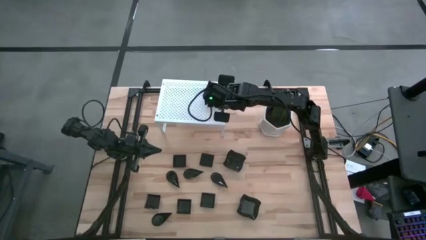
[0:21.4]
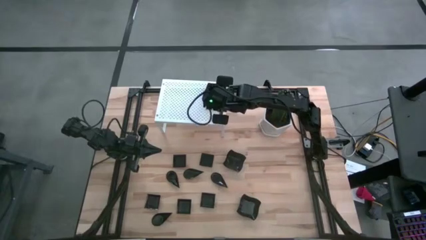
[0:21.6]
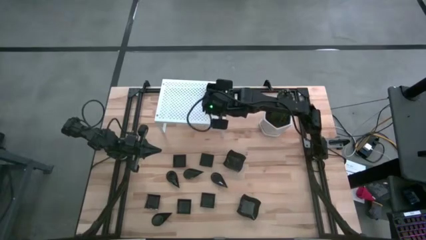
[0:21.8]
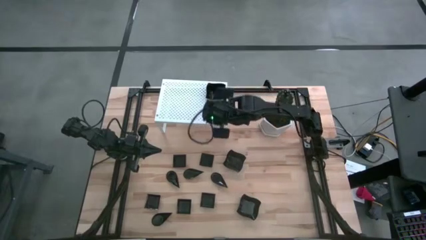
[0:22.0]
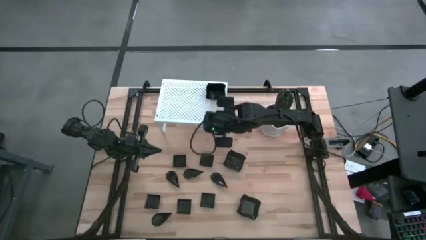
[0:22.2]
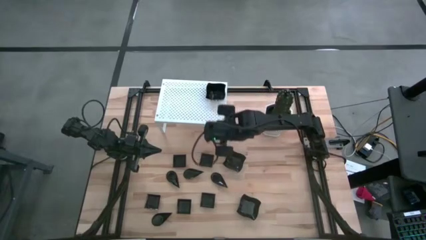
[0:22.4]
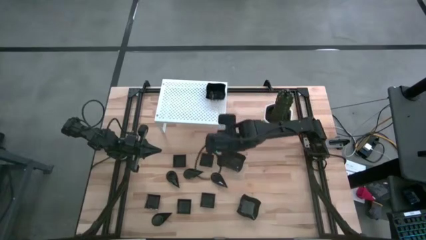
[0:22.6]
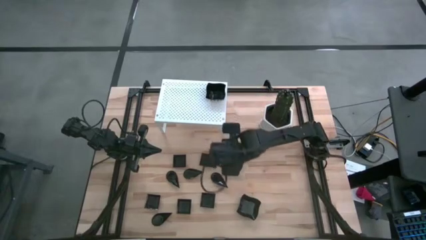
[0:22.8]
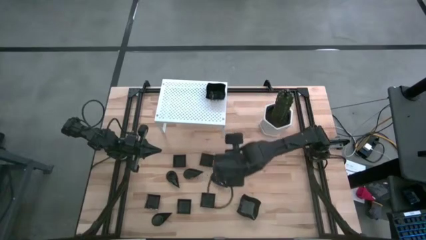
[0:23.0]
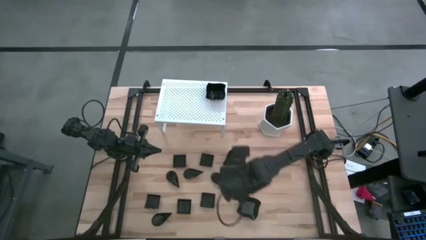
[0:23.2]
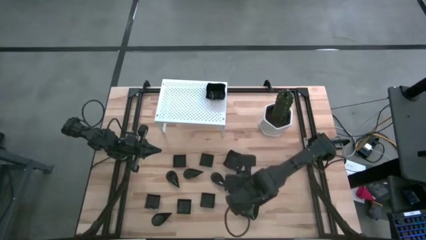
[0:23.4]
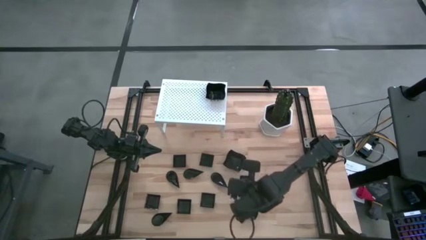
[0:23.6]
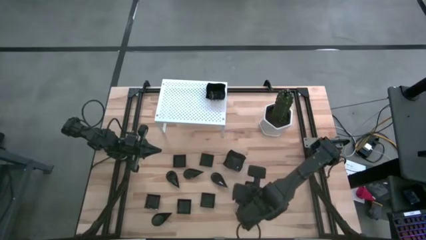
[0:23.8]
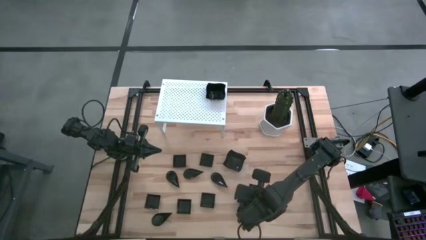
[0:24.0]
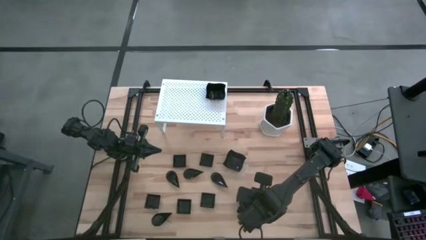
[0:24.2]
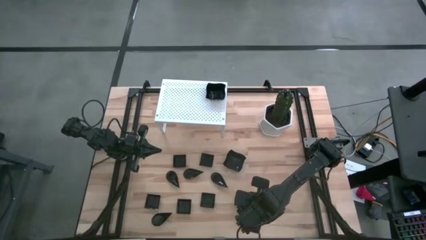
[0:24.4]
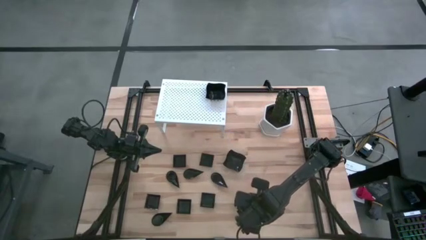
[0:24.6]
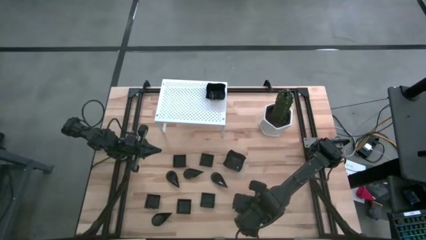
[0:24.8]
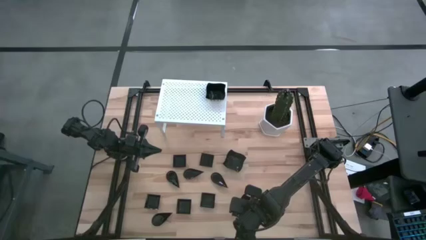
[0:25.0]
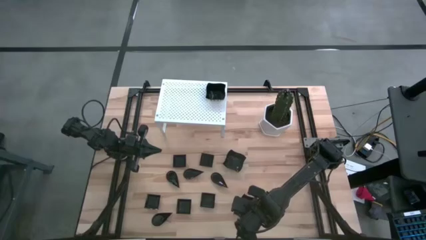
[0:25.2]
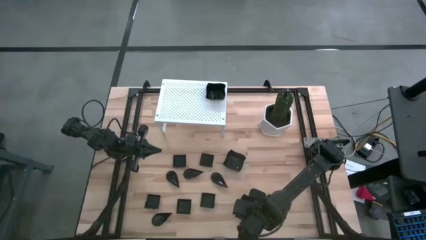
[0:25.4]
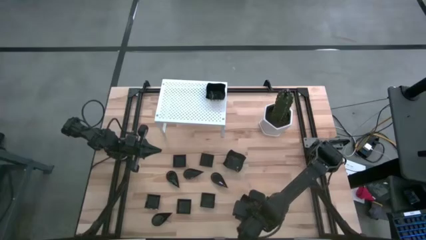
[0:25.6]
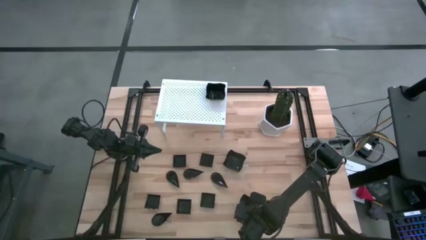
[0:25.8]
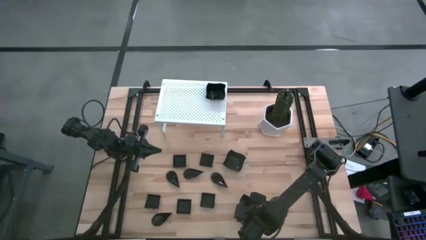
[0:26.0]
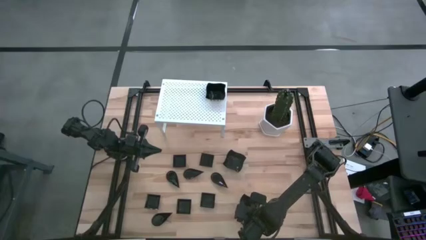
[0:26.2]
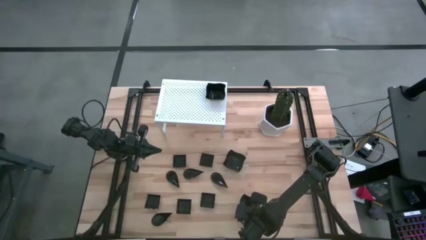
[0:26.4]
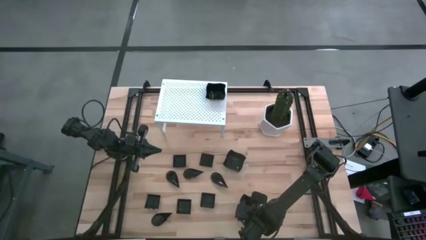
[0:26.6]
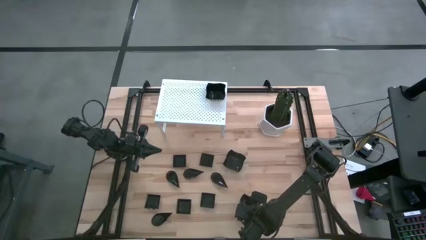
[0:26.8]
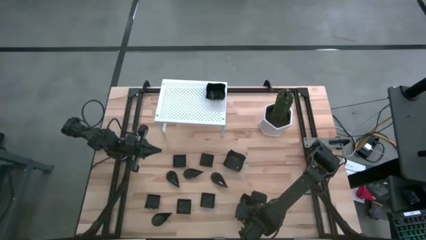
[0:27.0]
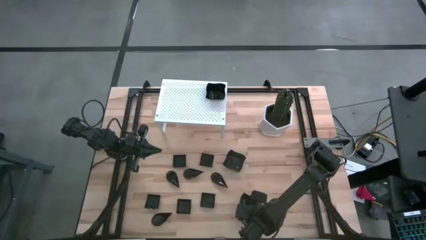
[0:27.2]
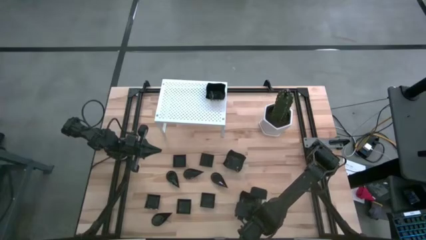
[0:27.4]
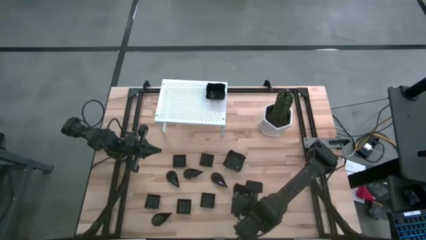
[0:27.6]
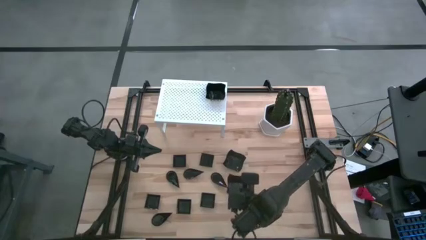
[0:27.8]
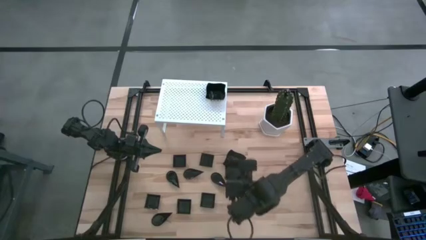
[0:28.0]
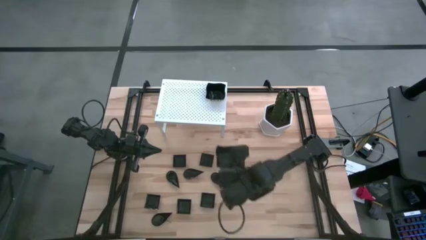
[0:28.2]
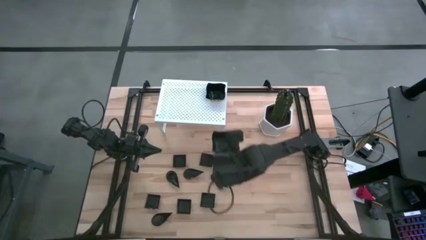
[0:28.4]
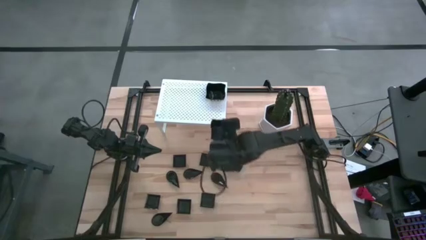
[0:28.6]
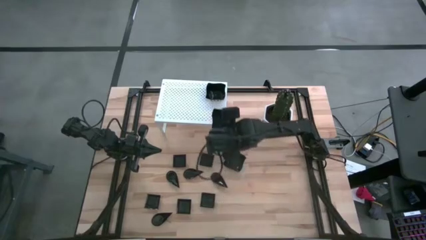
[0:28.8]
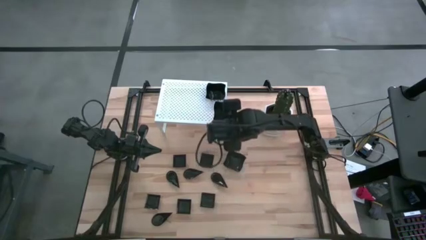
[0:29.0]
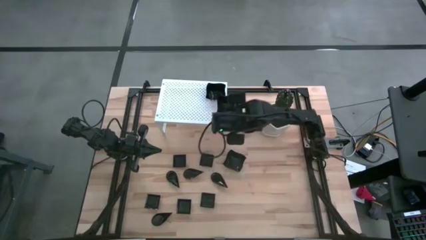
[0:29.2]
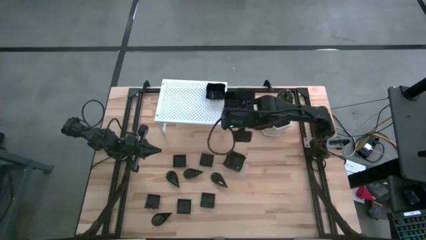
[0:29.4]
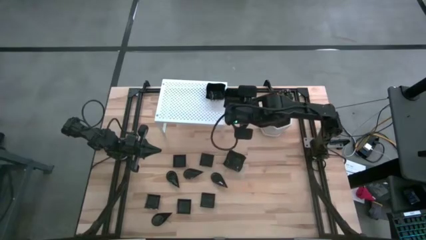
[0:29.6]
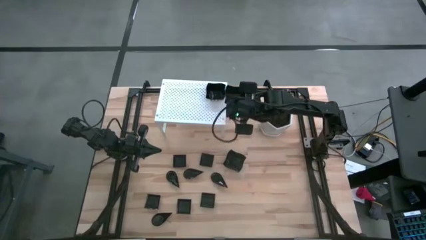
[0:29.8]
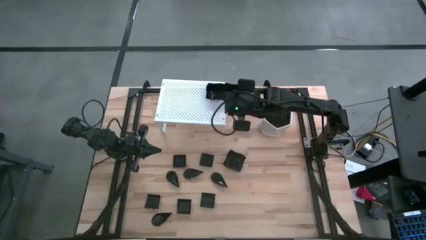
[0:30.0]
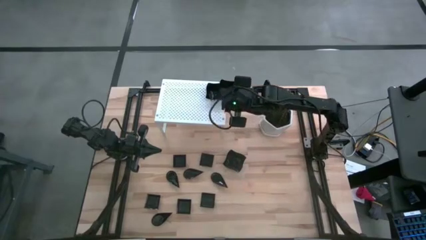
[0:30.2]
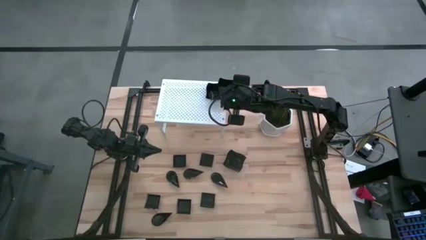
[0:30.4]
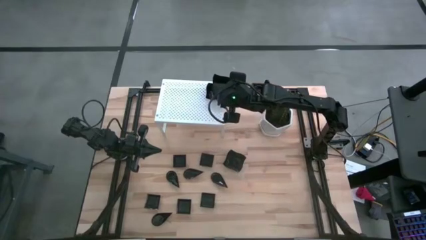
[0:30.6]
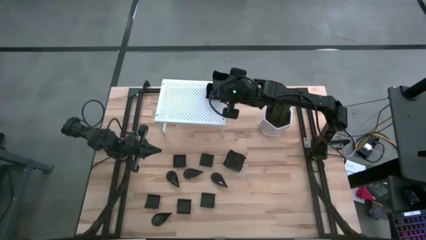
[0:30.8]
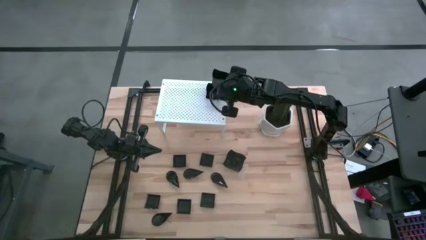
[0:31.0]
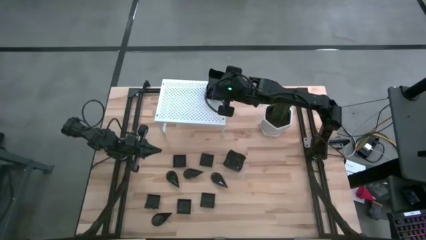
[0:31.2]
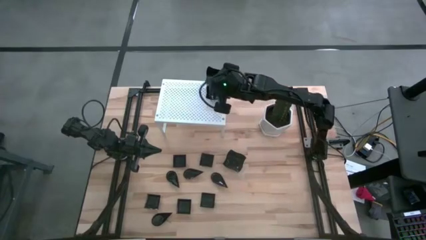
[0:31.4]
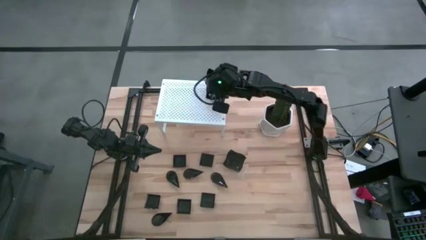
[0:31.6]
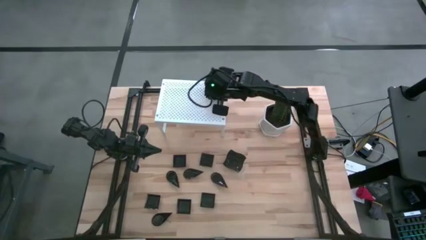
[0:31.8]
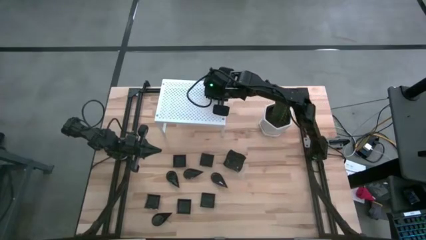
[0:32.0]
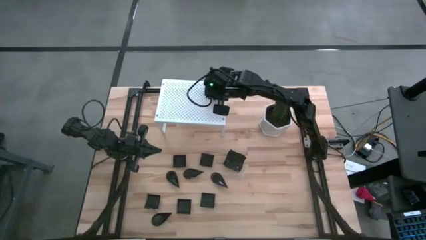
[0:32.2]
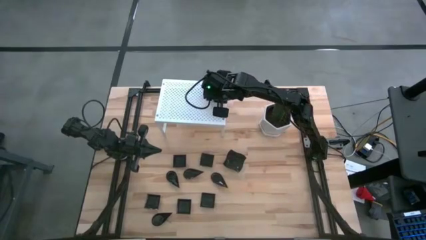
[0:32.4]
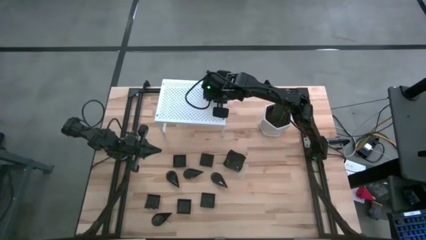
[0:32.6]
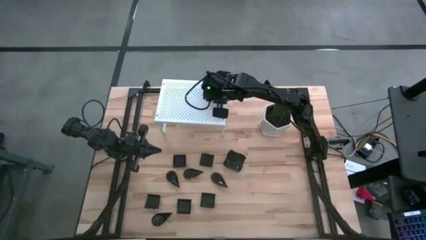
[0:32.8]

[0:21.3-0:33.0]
Task: Pick & Place Mini shaped plates
Stack the distorted square plate on top of the other distorted square plates on the shelf

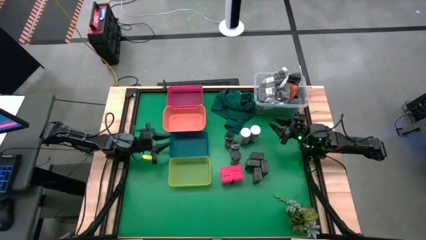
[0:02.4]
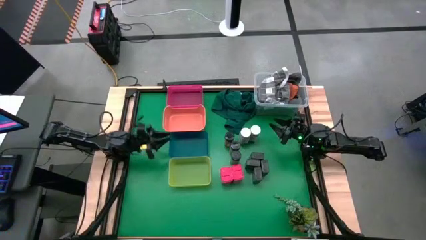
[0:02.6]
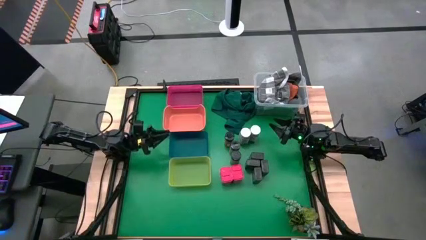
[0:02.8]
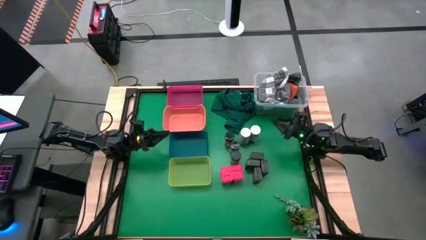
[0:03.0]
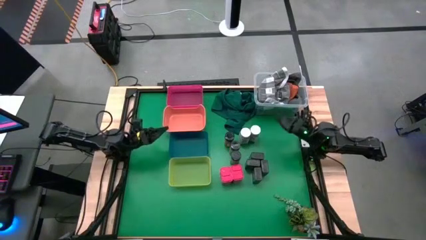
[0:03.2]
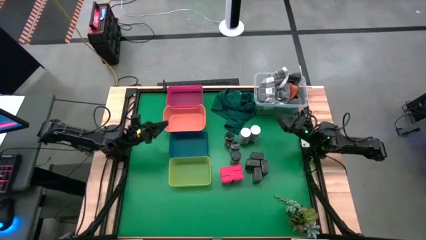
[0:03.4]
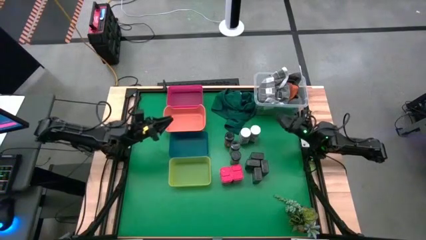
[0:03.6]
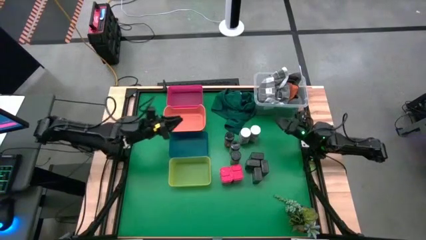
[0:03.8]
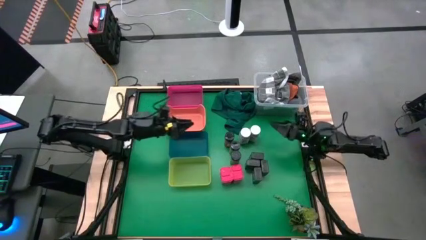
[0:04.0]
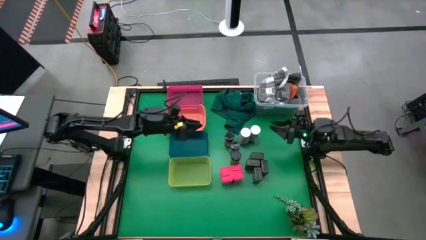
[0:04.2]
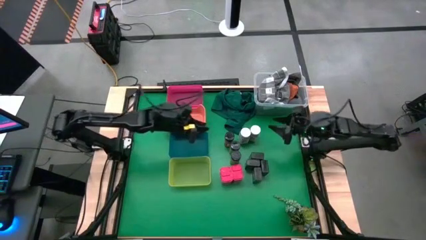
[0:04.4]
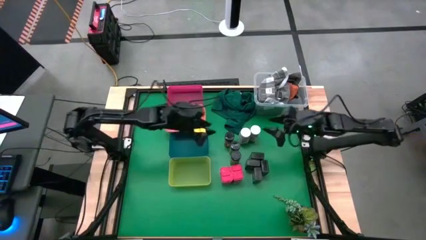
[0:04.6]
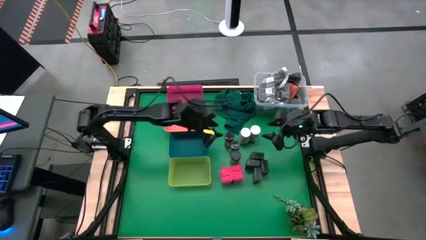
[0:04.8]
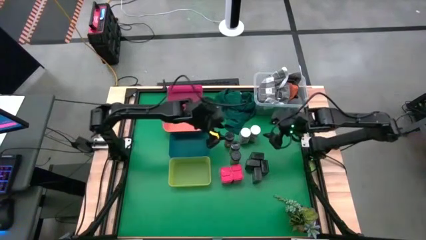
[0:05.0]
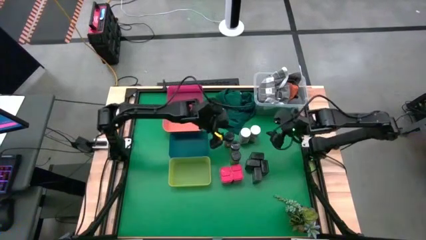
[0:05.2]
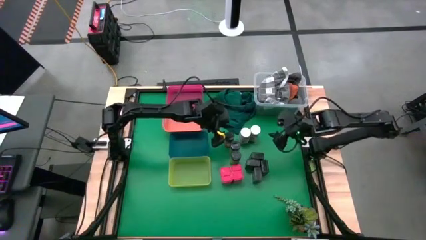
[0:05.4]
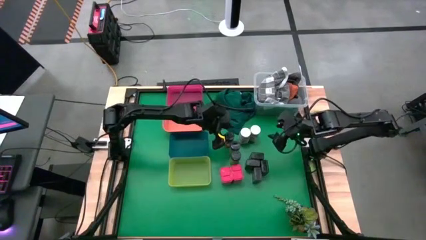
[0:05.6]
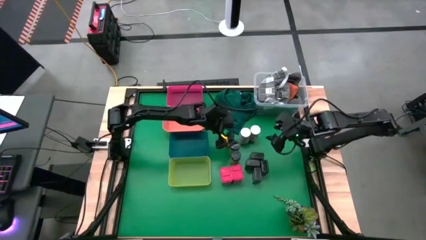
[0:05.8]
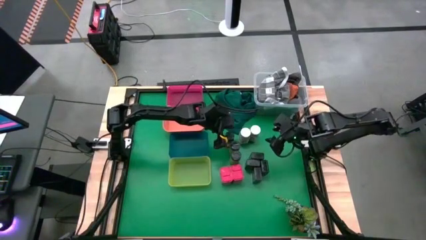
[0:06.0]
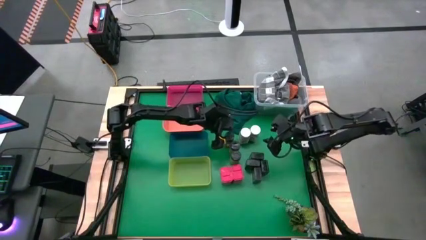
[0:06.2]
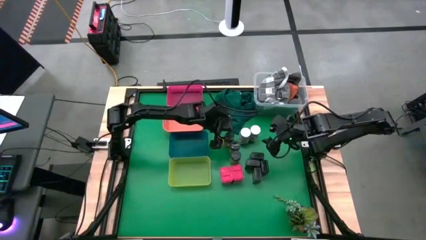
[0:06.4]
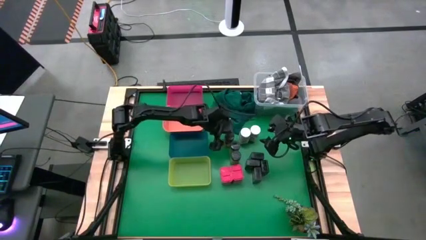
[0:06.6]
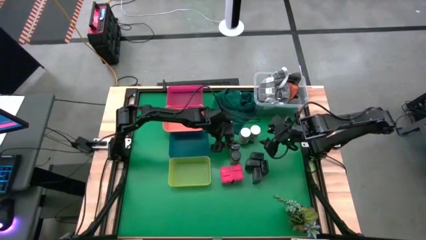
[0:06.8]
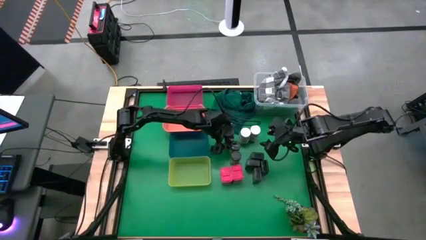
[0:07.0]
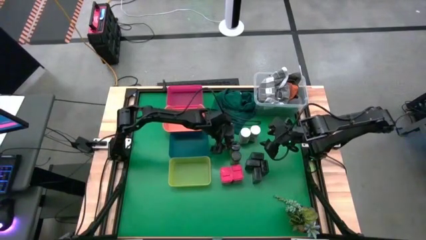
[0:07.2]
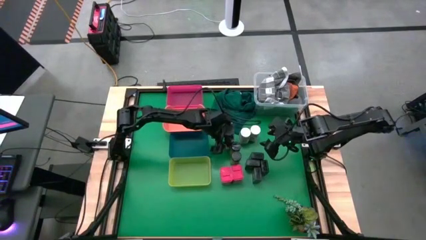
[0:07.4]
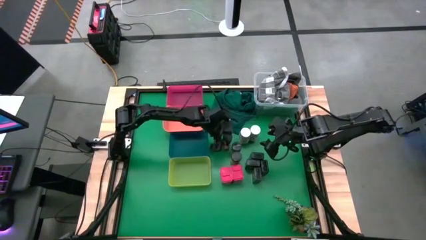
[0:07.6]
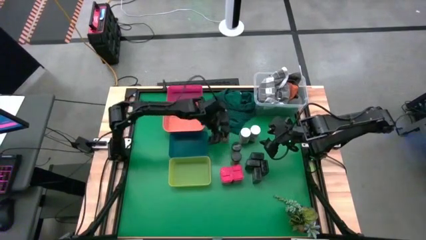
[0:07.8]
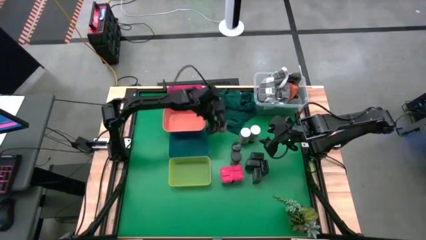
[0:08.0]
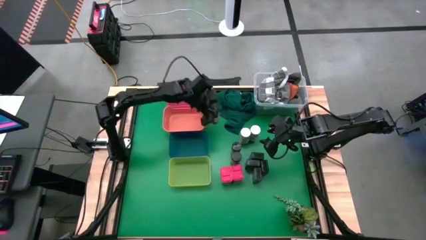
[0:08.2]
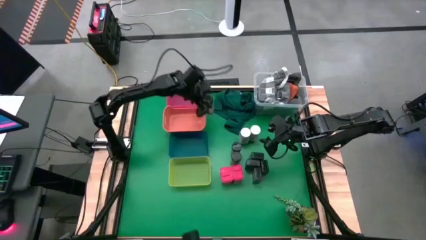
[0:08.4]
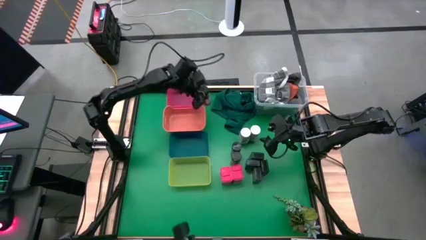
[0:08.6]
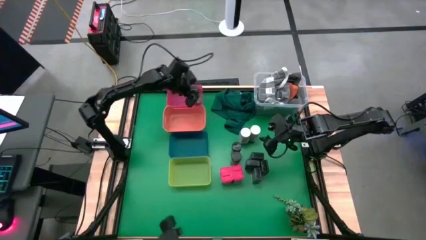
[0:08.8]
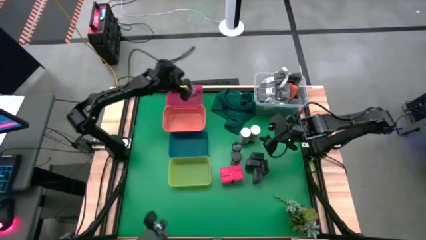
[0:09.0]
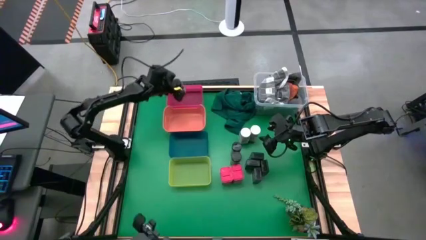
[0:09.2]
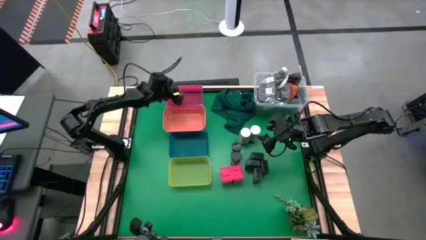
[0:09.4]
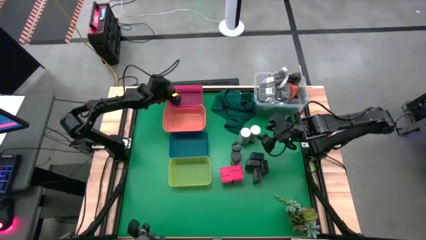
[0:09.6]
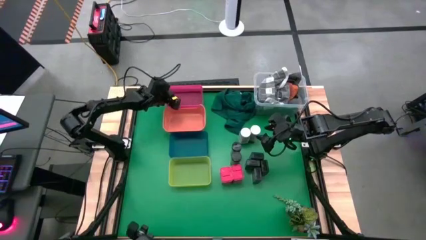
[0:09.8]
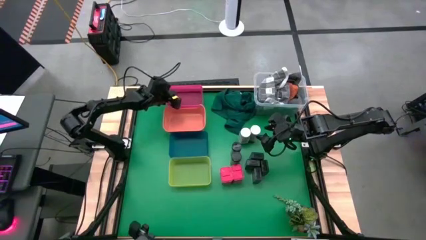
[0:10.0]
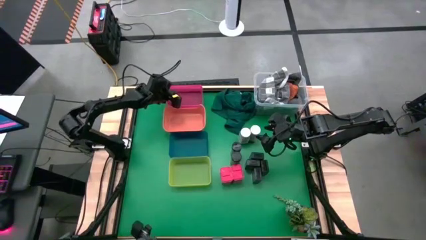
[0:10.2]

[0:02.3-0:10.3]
Task: Sort spices by type
Put the top black spice bottle into the pink bin
